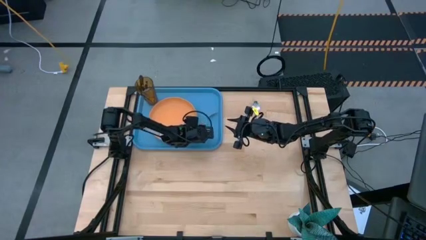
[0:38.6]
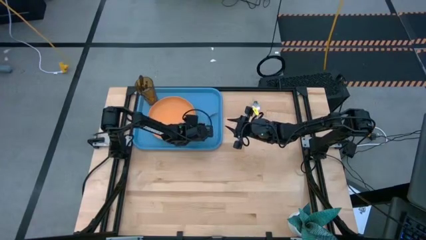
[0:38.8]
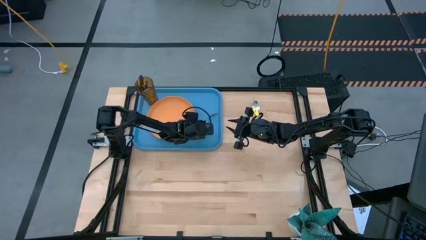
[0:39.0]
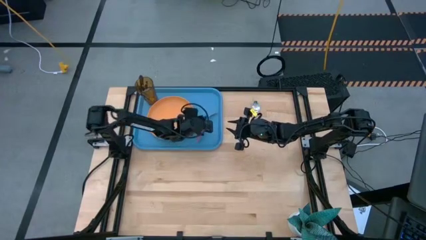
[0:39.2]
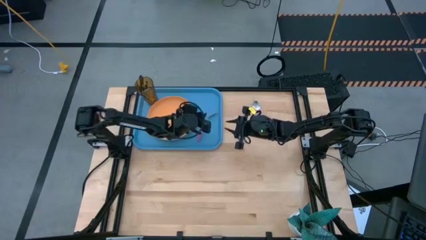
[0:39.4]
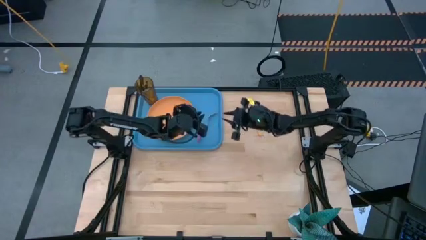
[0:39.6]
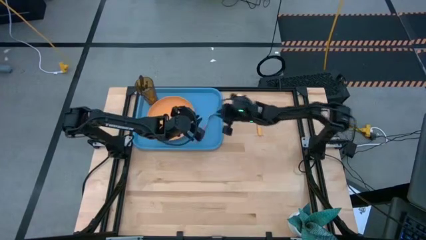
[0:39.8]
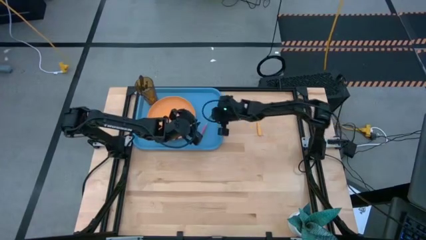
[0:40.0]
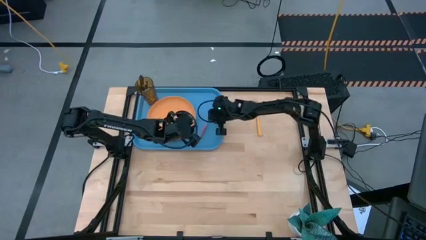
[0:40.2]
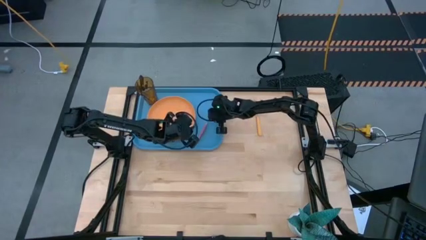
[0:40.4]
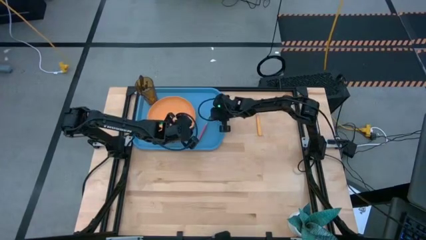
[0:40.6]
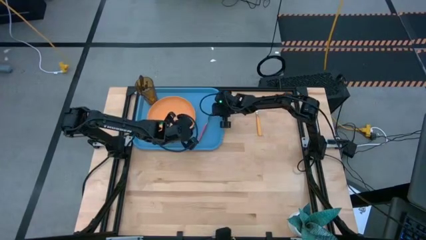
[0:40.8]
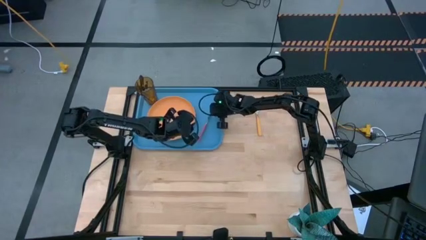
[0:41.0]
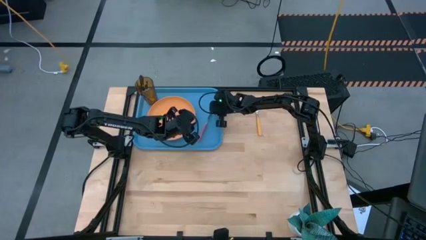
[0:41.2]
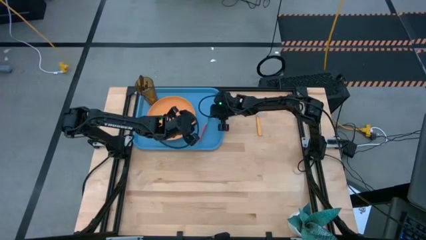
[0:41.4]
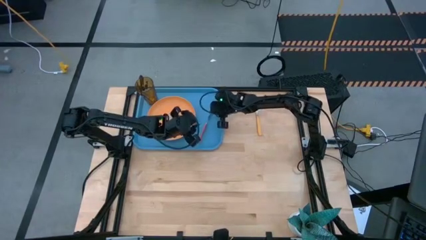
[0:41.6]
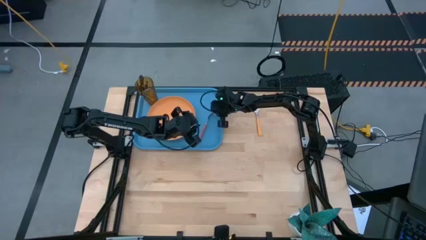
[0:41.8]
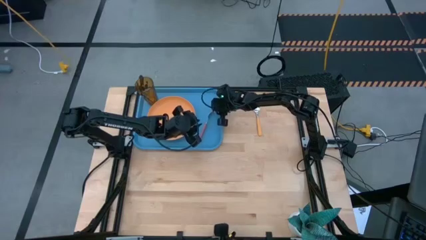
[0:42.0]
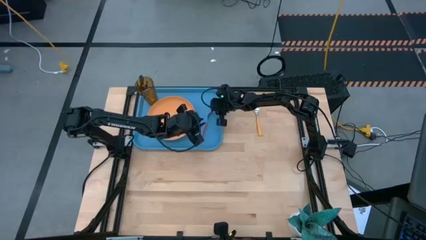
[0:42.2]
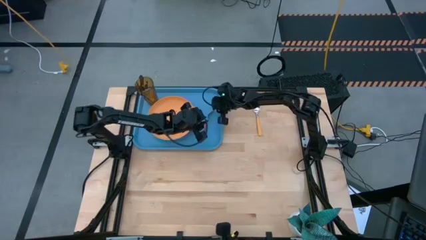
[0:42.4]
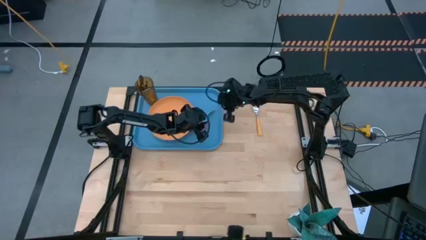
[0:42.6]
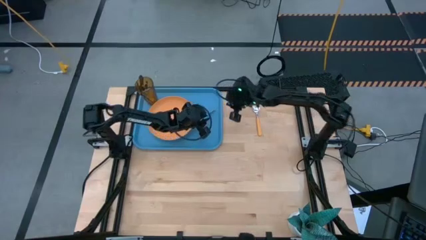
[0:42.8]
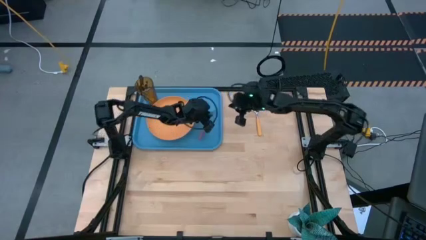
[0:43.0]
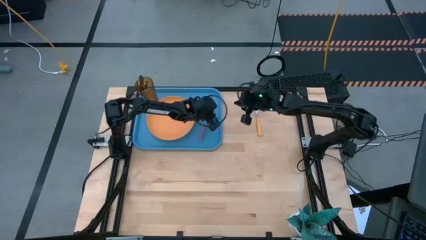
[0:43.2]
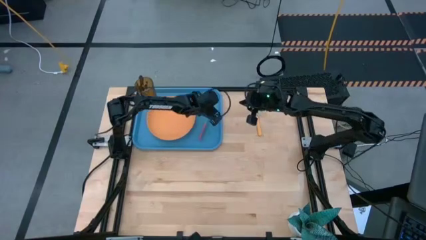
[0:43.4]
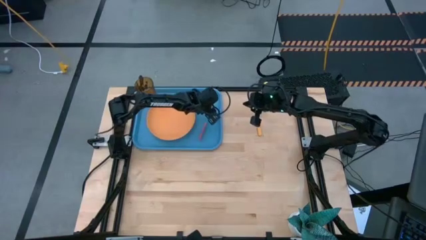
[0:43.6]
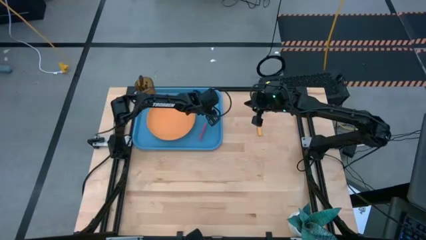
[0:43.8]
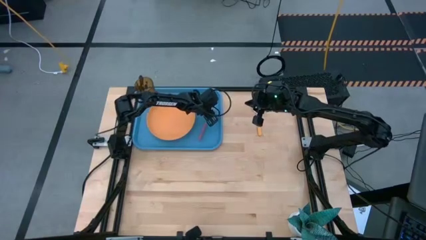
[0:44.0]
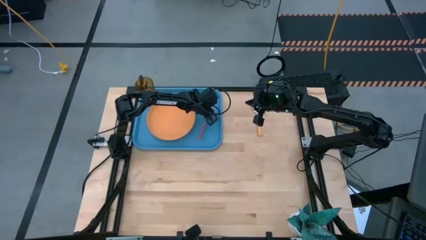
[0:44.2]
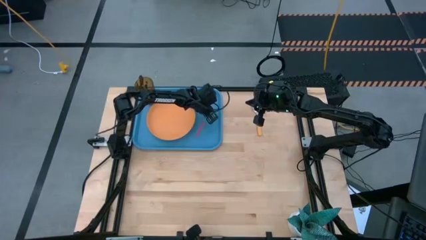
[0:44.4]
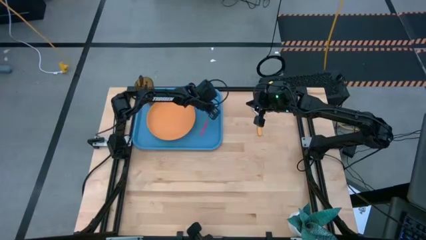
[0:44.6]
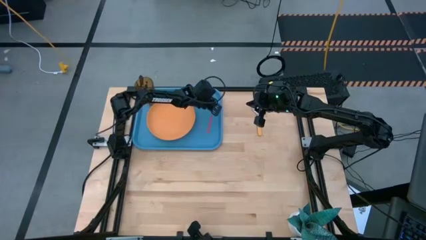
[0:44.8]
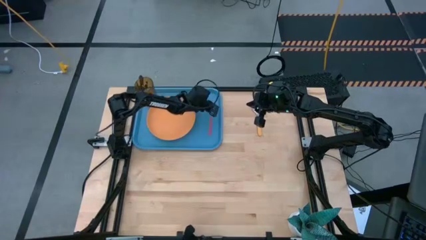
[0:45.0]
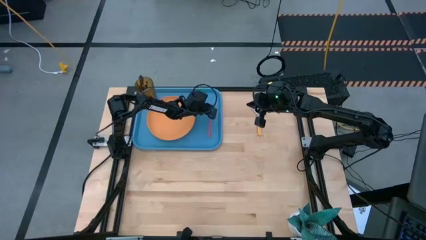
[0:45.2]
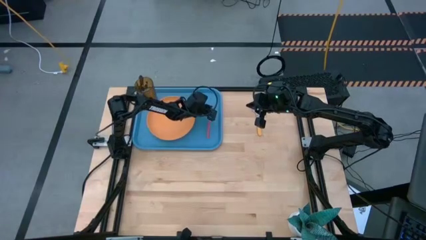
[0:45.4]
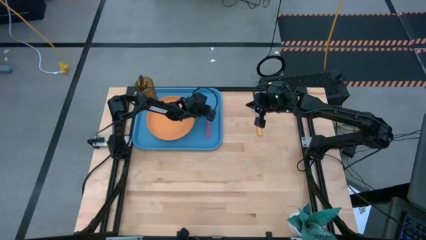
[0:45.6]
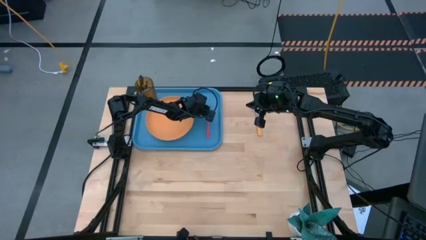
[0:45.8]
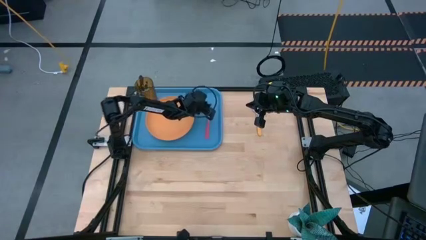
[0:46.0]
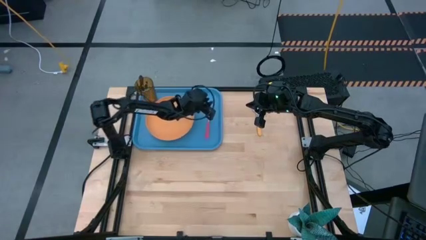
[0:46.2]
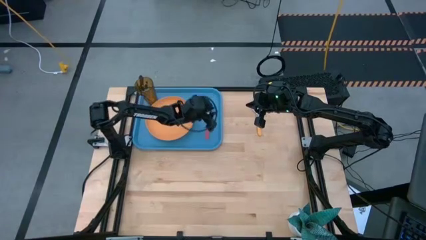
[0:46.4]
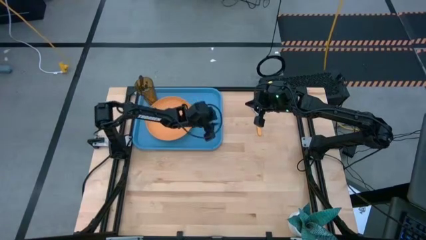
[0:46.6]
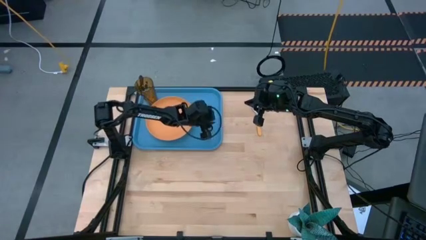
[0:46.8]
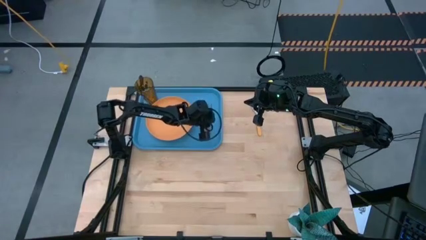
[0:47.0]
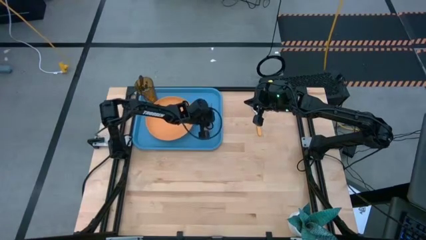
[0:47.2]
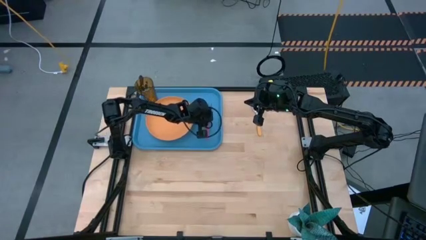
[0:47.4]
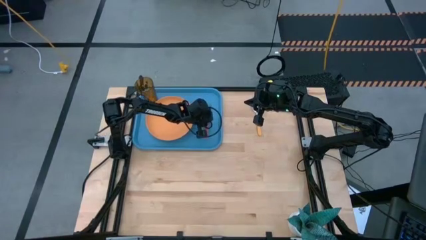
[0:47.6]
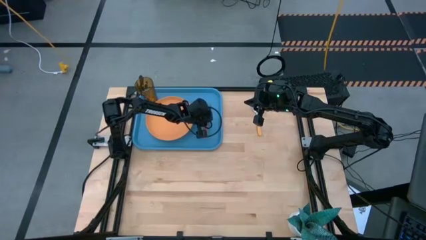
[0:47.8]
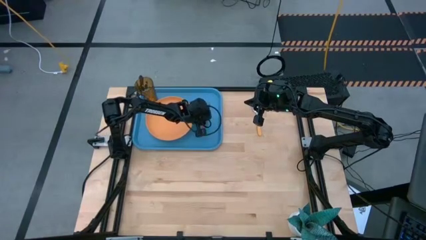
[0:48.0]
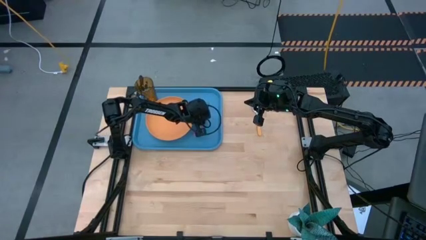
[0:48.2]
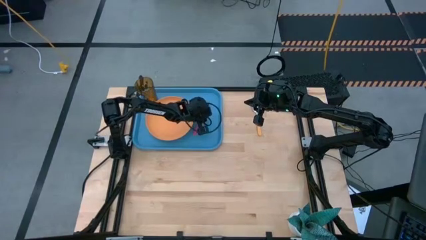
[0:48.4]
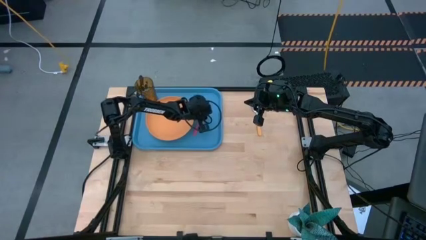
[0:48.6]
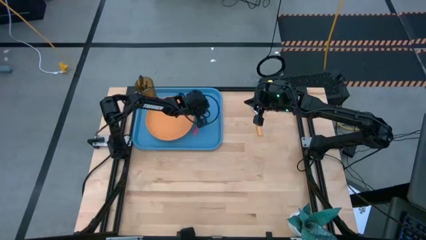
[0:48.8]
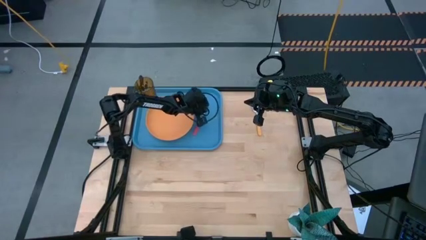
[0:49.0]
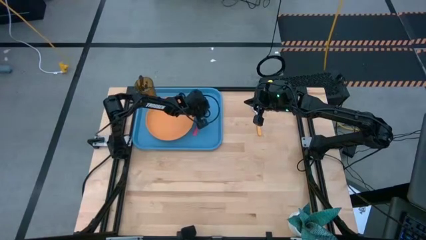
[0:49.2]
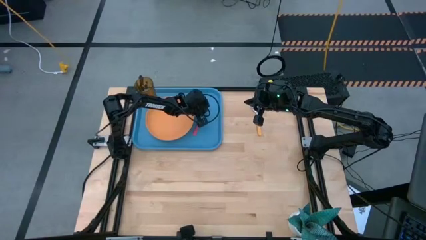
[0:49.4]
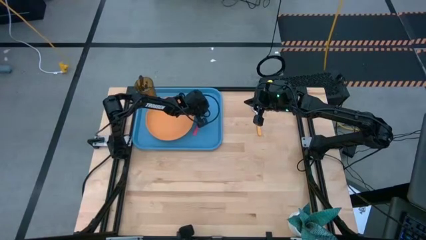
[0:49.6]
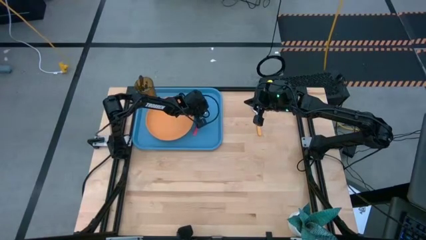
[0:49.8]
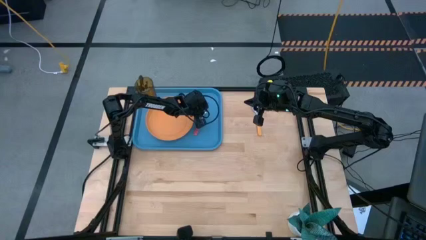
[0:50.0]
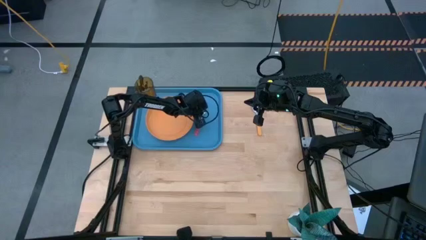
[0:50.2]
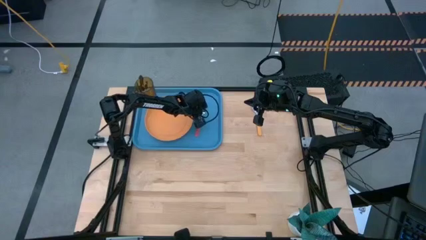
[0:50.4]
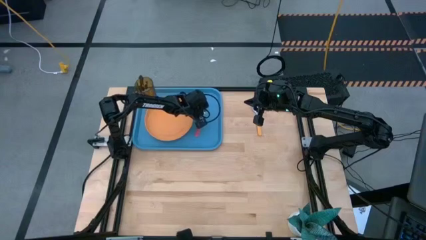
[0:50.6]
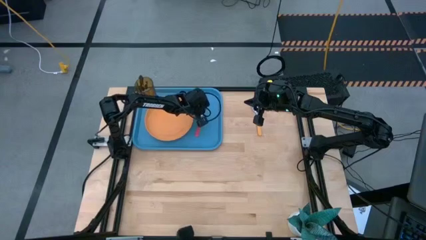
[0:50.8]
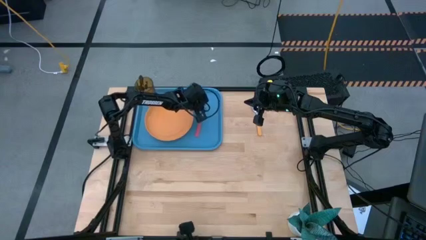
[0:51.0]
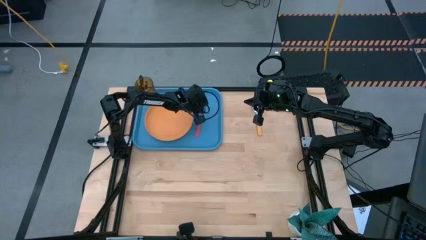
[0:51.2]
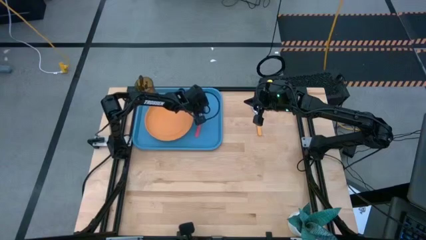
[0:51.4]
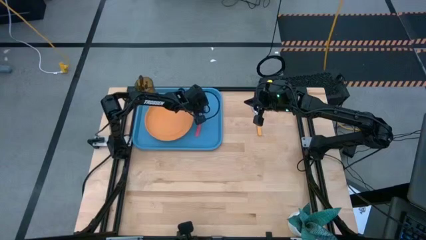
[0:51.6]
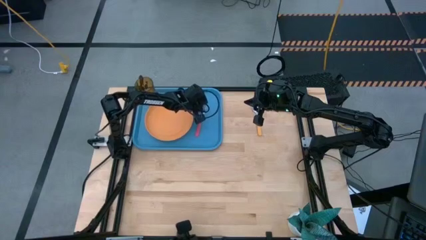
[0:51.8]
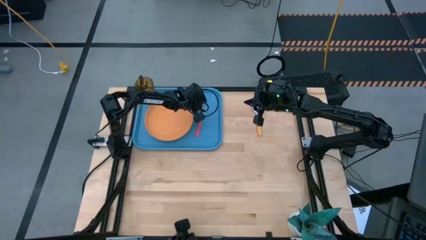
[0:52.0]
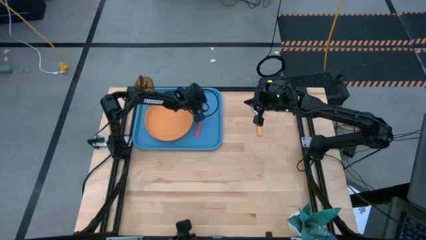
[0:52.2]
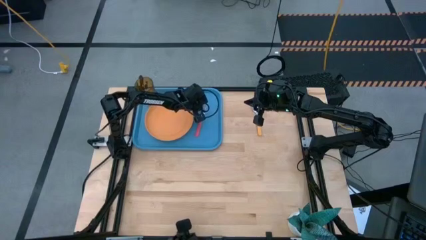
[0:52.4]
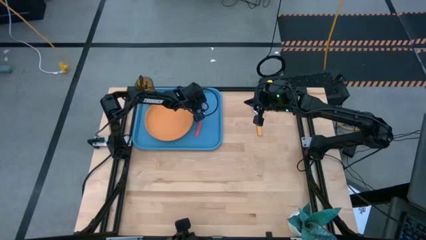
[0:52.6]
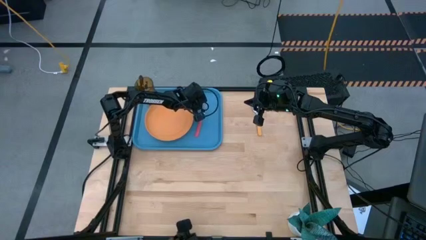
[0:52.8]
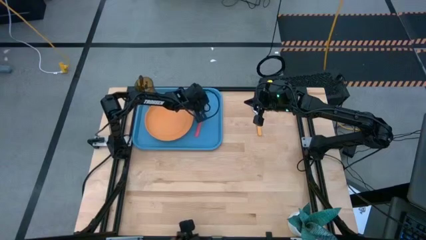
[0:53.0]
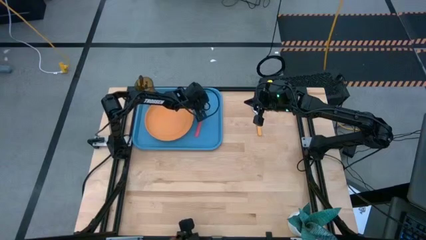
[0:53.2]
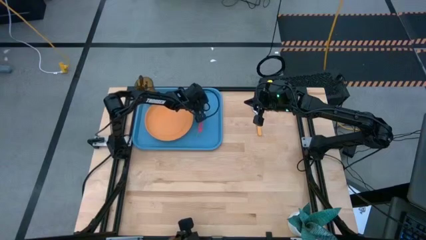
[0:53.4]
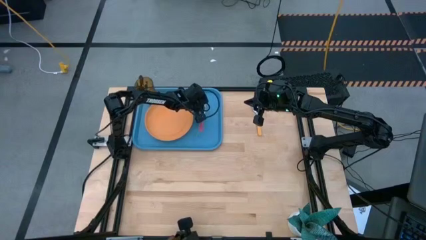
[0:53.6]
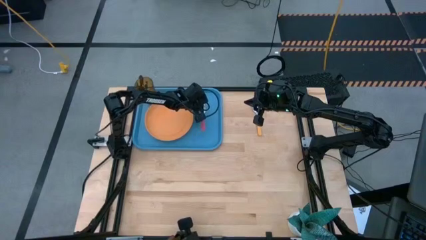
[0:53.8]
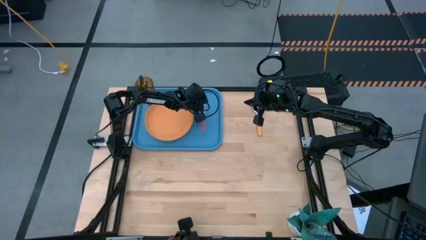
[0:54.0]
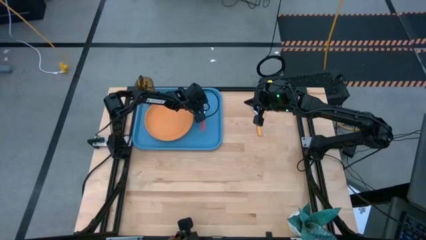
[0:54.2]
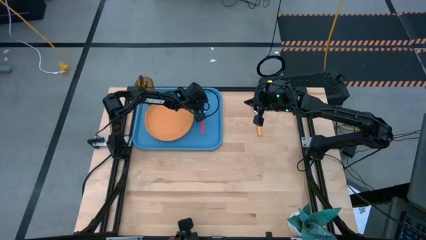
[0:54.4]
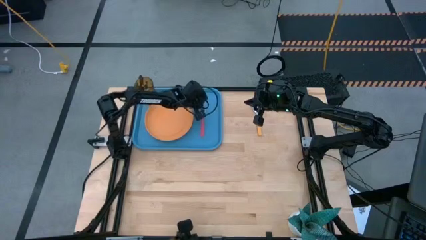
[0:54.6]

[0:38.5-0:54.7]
Task: Pick and place plate/cup/fork/spoon on tray
Put the red fork on the blue tray
